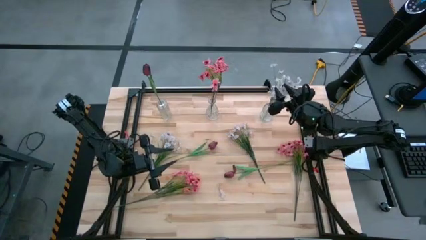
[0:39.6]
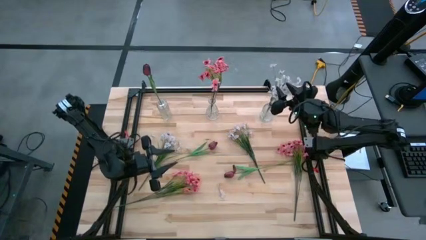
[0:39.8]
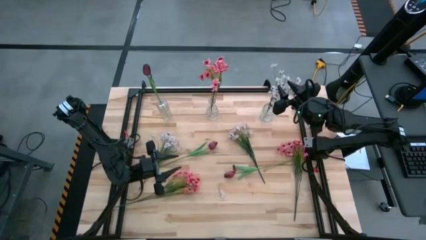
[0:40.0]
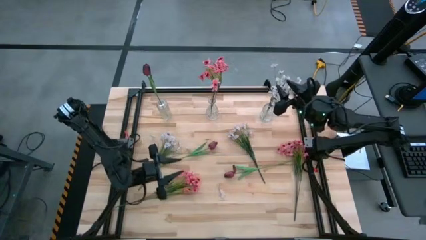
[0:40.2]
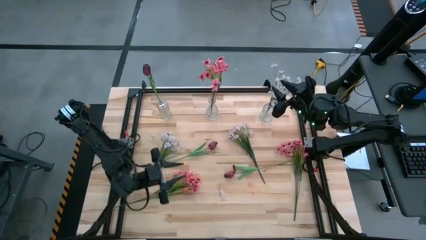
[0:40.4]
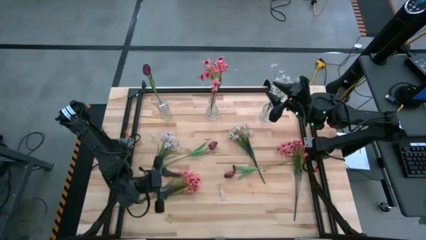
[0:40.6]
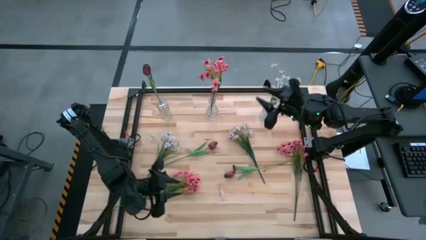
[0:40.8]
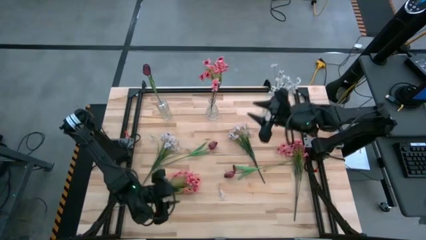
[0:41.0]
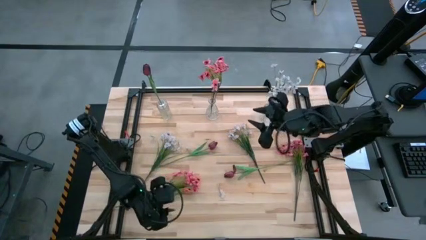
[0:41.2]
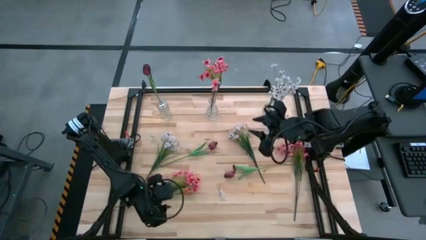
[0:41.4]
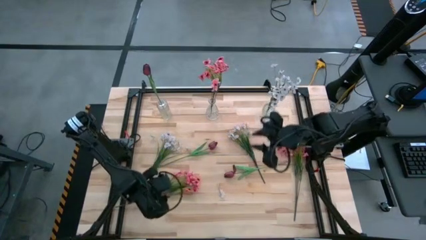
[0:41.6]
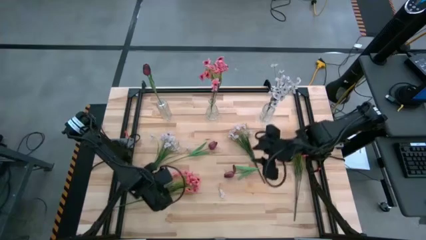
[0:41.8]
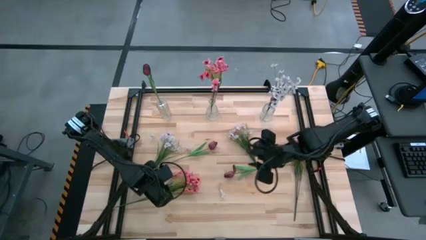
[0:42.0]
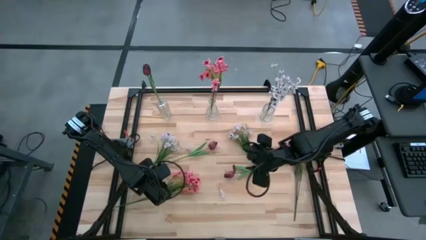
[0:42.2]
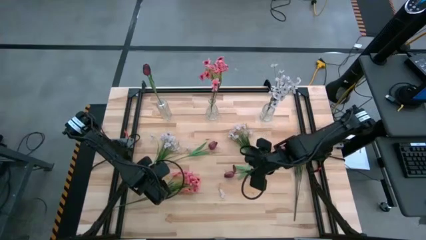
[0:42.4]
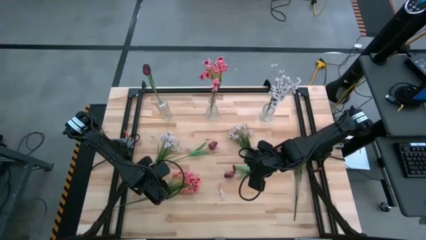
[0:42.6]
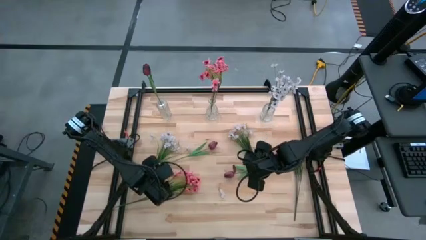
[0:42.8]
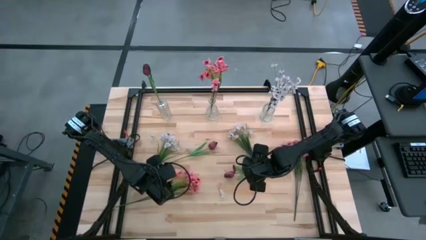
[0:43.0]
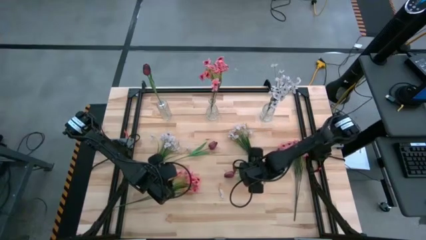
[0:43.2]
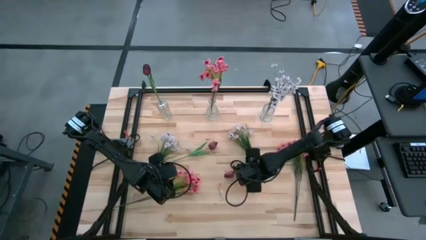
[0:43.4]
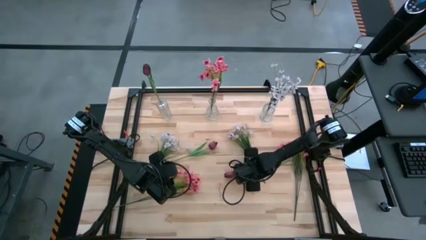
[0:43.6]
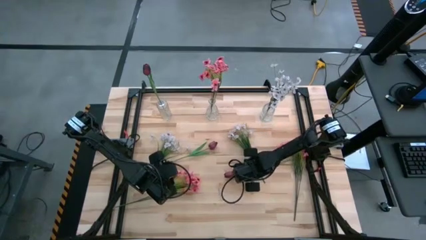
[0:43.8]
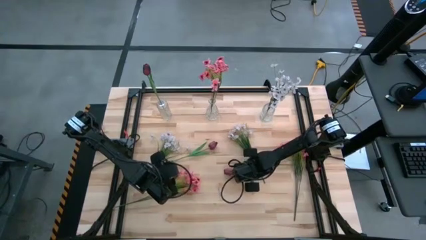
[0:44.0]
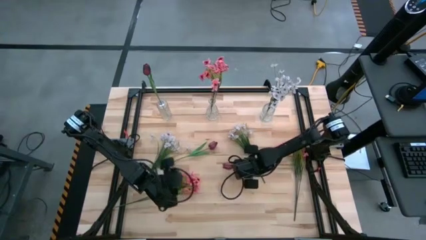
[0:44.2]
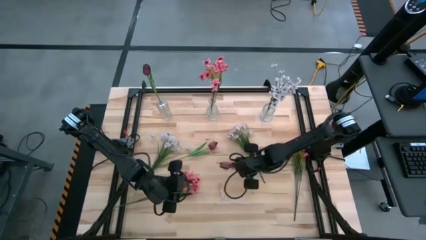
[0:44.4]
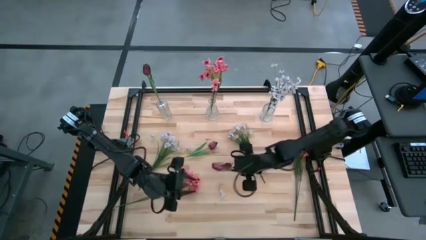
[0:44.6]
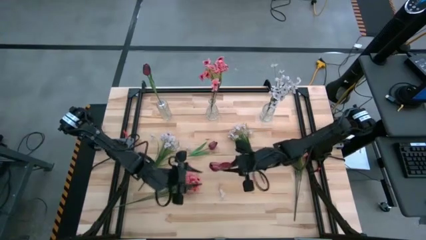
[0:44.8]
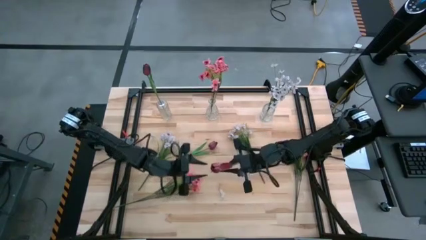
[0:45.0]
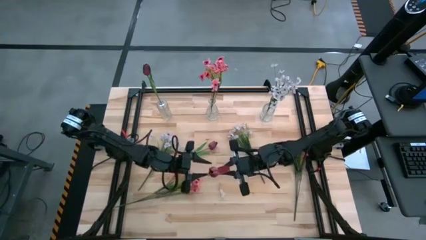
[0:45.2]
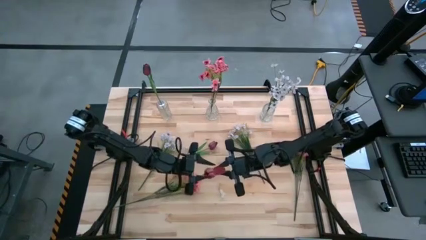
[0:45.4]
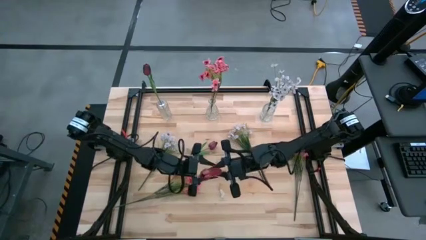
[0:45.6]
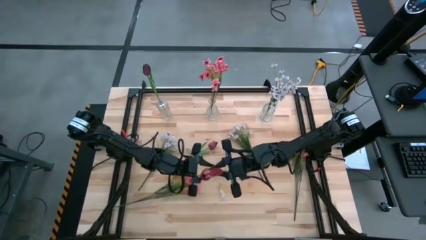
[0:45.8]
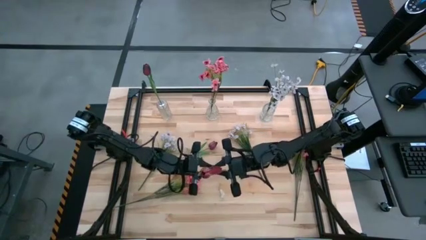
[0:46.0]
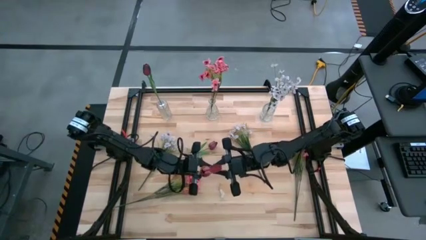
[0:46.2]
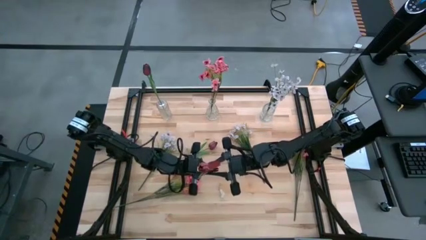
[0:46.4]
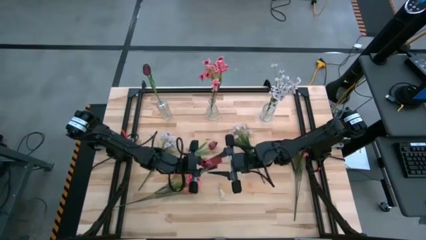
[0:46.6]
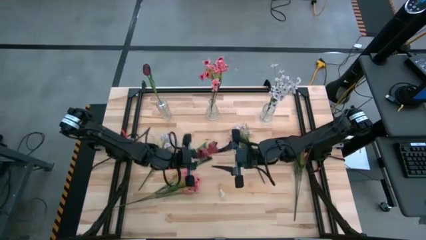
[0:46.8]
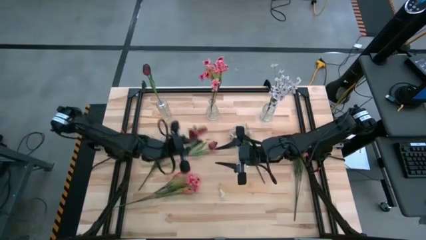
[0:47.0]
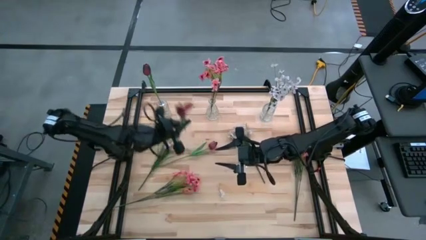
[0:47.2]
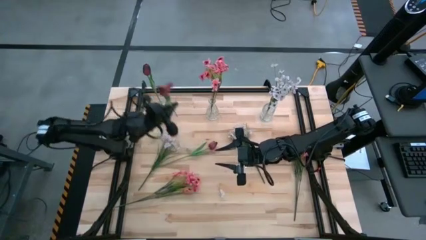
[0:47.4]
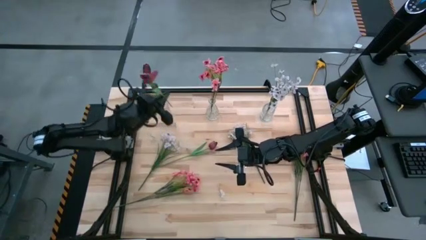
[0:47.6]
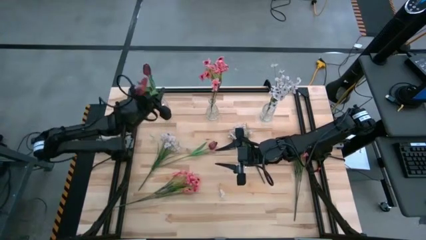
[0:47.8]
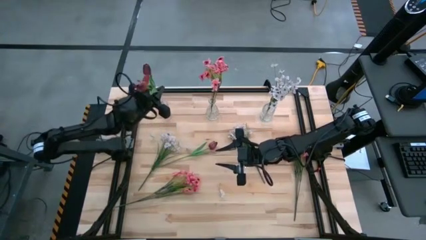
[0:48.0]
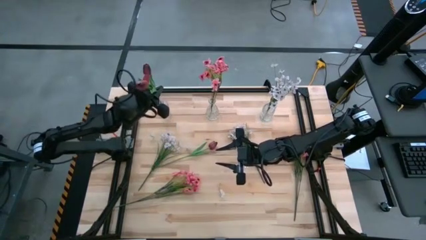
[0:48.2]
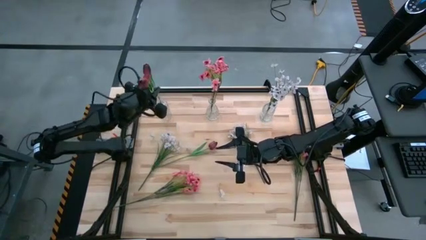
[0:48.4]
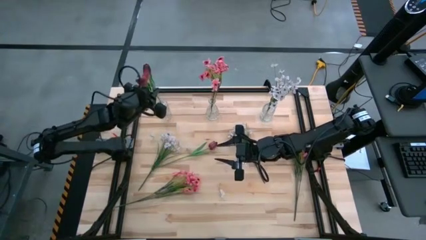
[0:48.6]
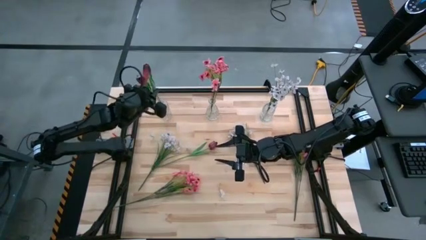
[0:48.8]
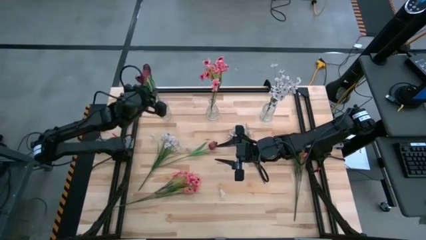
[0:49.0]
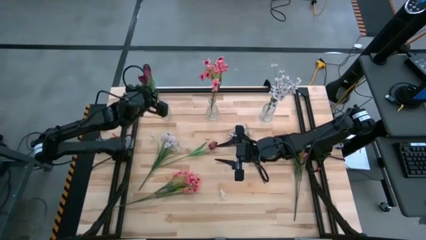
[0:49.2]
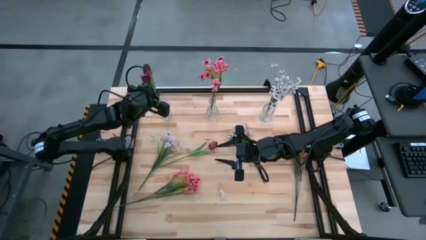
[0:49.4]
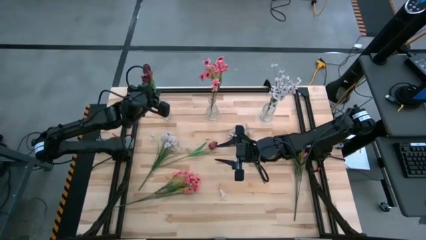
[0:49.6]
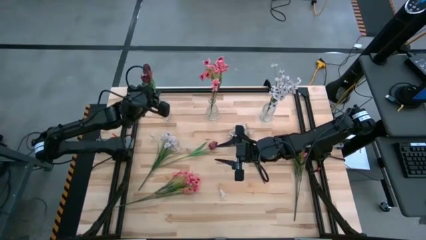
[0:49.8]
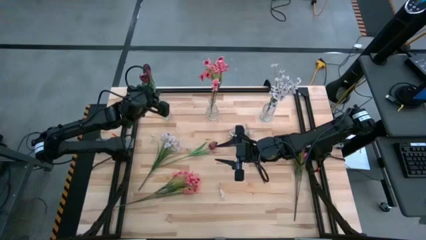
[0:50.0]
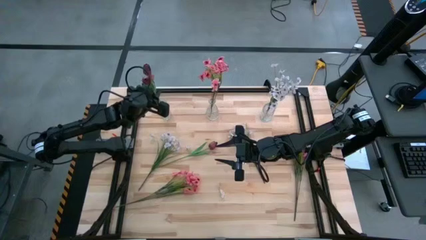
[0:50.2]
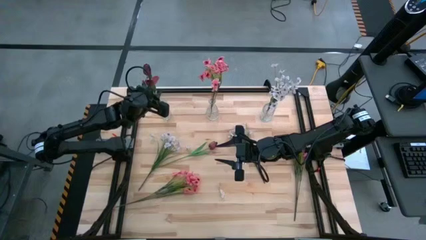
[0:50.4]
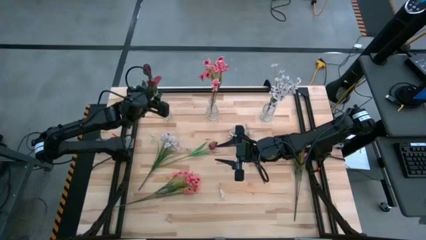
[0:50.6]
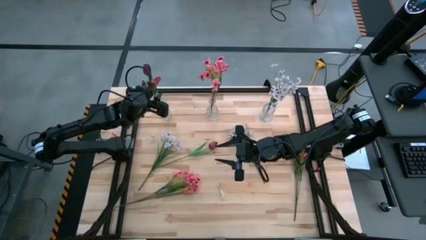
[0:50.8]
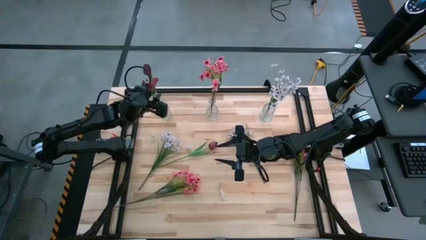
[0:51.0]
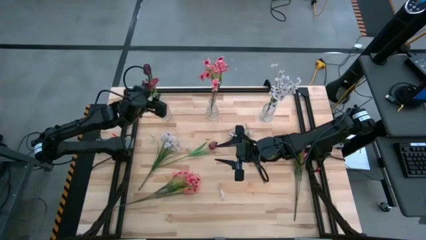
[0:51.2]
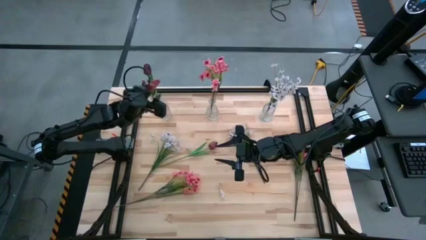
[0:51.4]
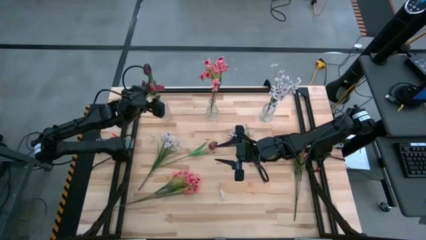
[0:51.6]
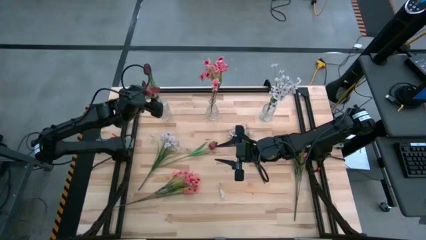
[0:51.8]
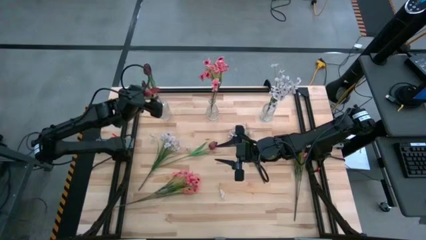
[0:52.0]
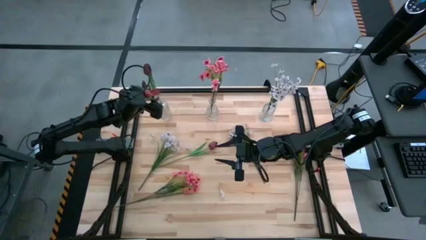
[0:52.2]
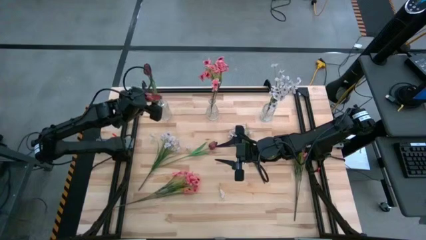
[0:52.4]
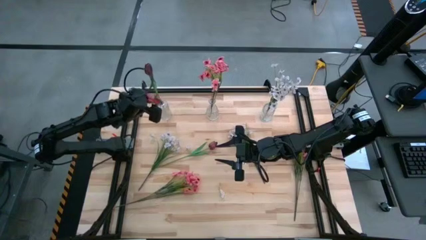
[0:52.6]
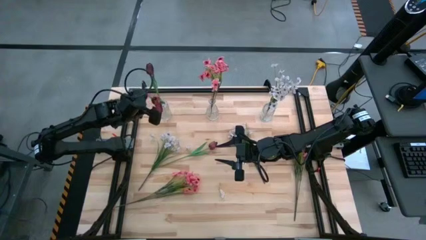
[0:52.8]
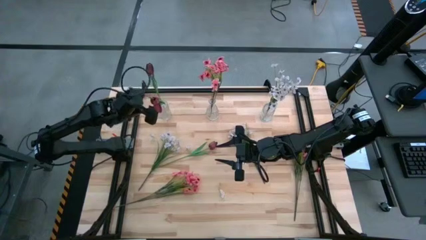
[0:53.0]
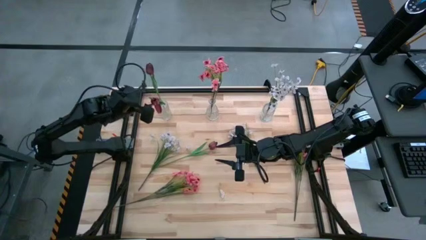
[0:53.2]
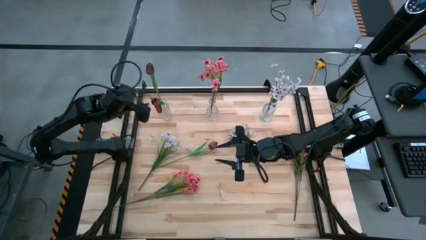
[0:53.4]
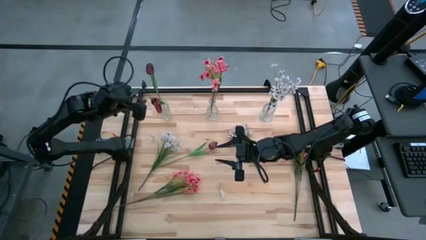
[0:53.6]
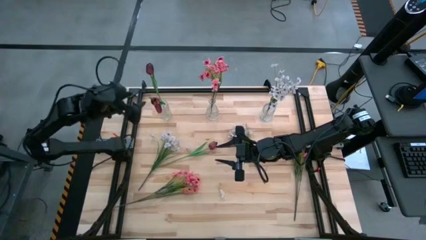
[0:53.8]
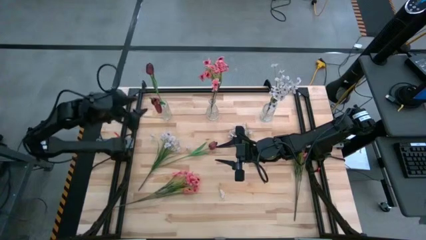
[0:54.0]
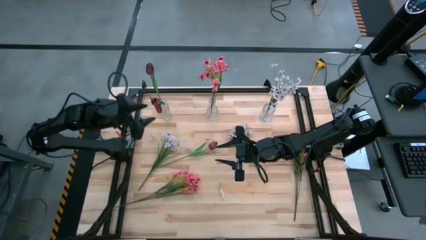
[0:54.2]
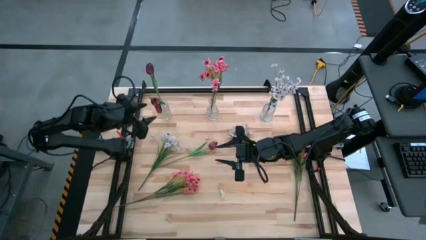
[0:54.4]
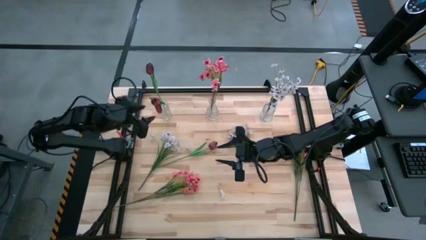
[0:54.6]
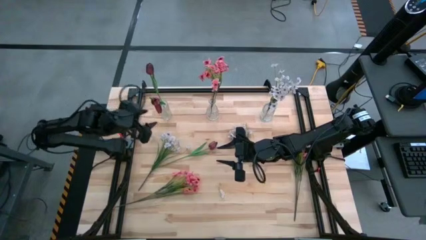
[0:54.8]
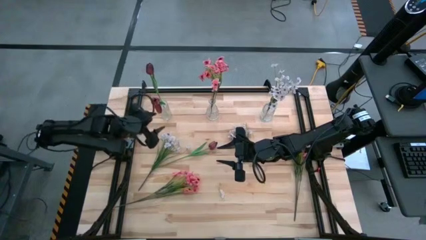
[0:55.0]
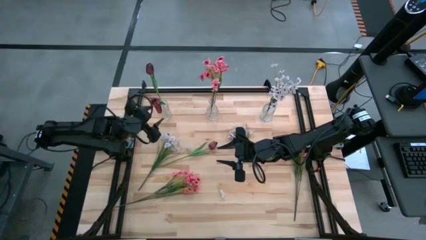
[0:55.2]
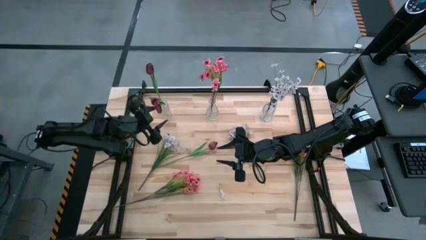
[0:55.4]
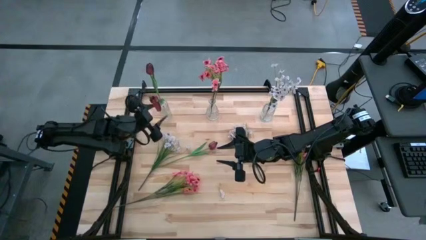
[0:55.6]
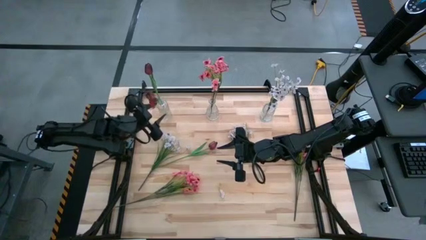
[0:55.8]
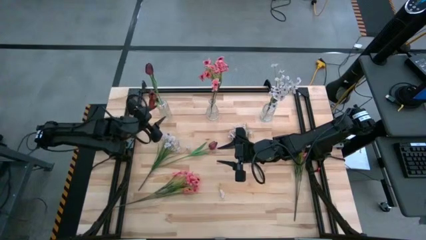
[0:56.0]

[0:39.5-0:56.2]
Task: Sort flowers into vase by color
Put the bottom purple tulip into the left transparent vase
